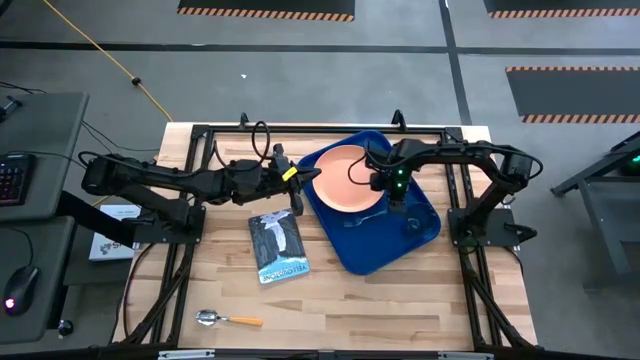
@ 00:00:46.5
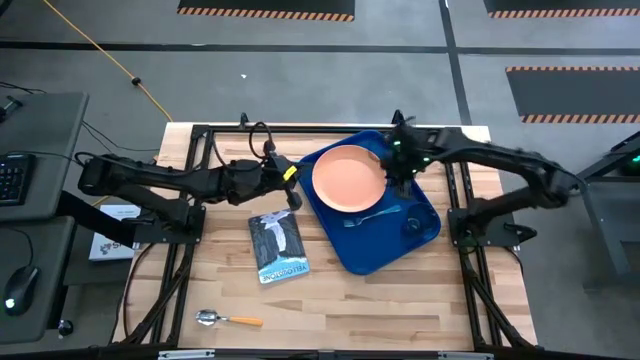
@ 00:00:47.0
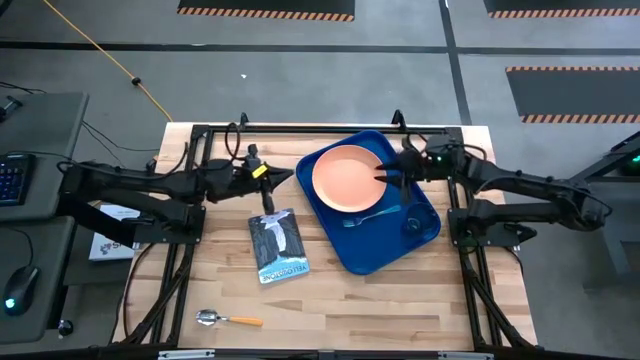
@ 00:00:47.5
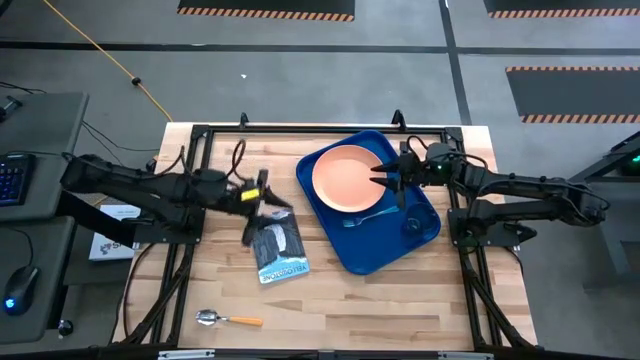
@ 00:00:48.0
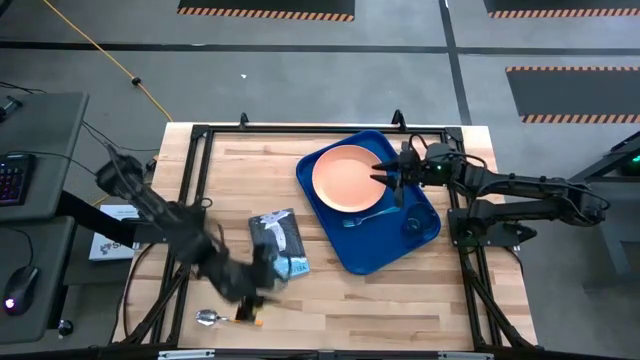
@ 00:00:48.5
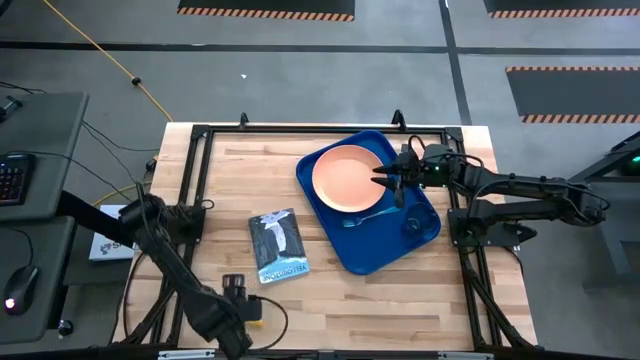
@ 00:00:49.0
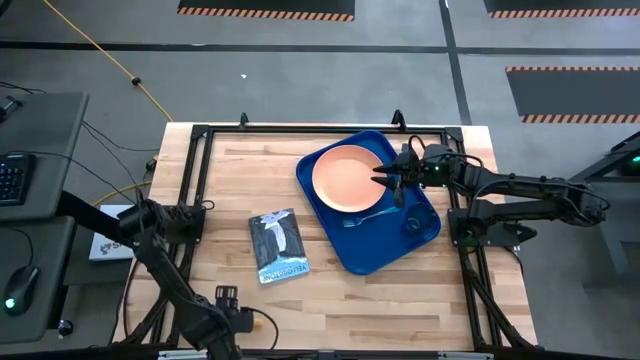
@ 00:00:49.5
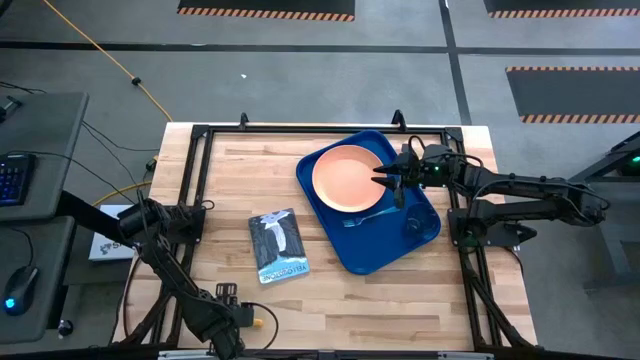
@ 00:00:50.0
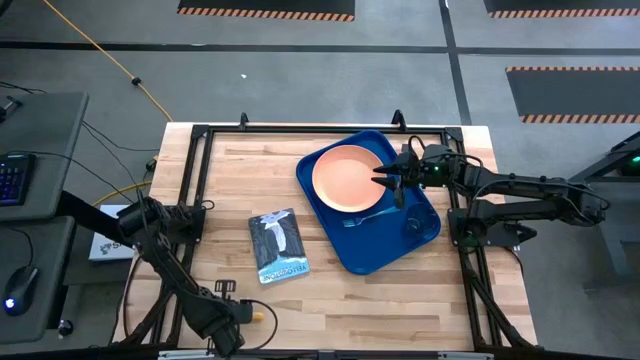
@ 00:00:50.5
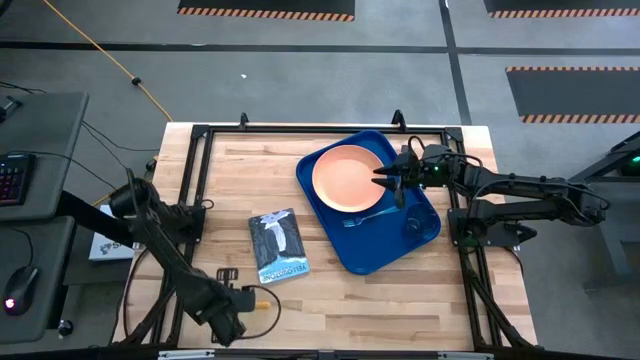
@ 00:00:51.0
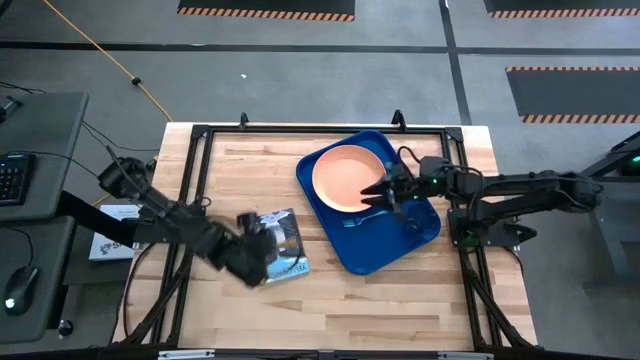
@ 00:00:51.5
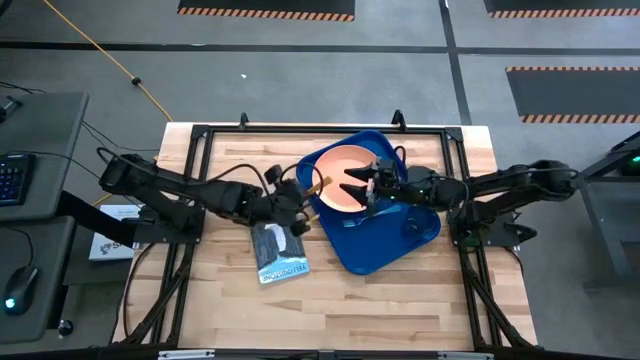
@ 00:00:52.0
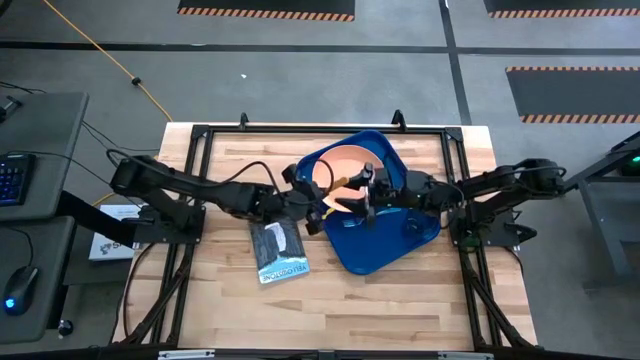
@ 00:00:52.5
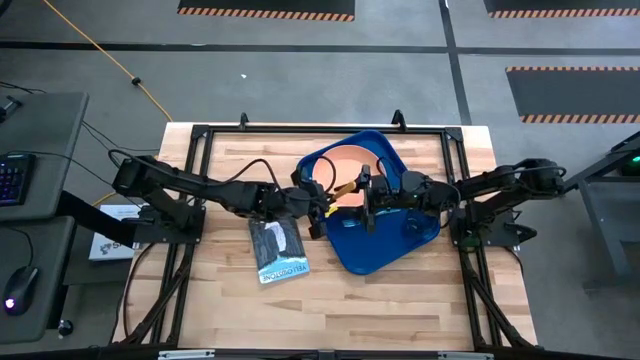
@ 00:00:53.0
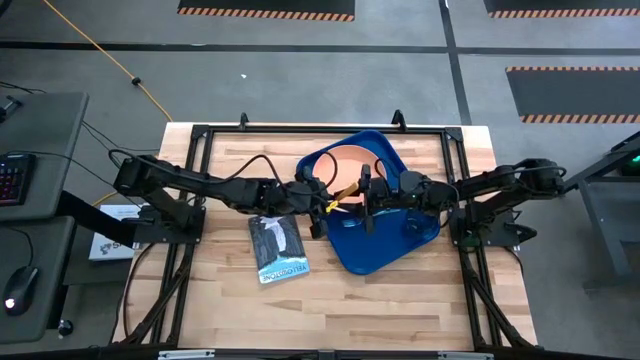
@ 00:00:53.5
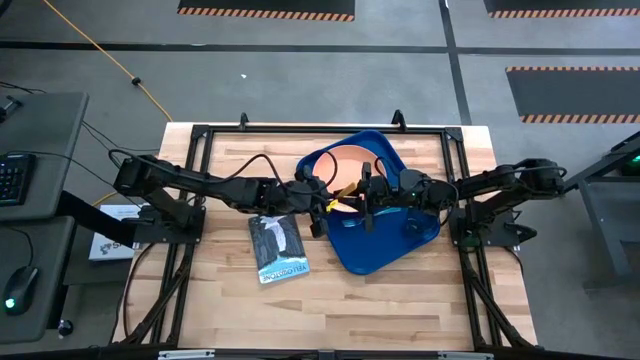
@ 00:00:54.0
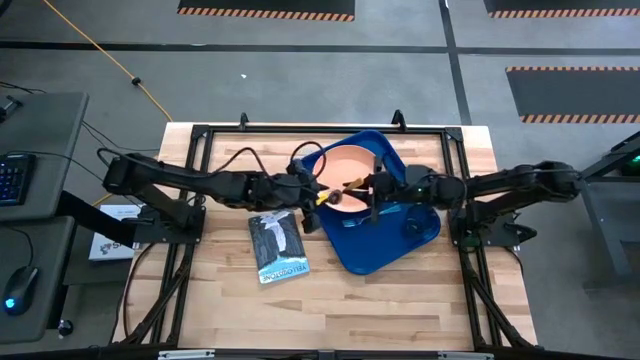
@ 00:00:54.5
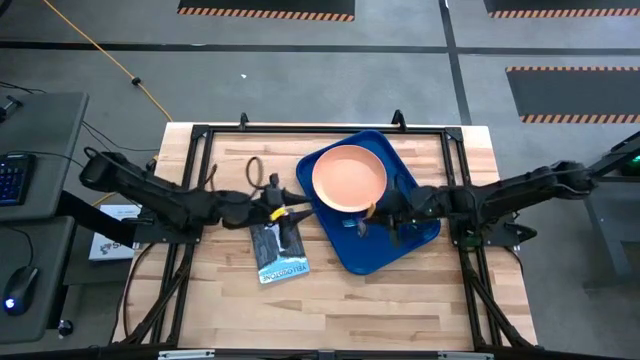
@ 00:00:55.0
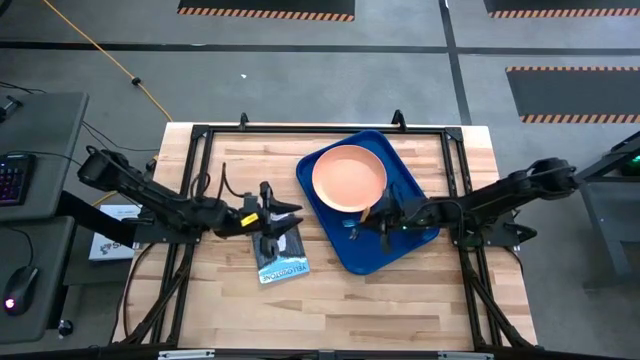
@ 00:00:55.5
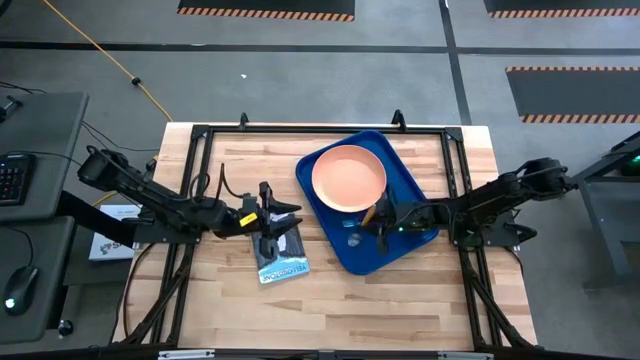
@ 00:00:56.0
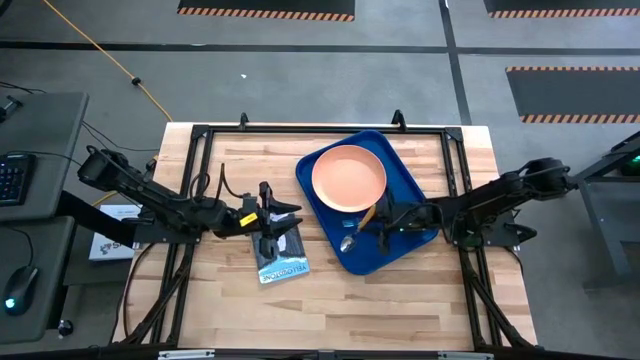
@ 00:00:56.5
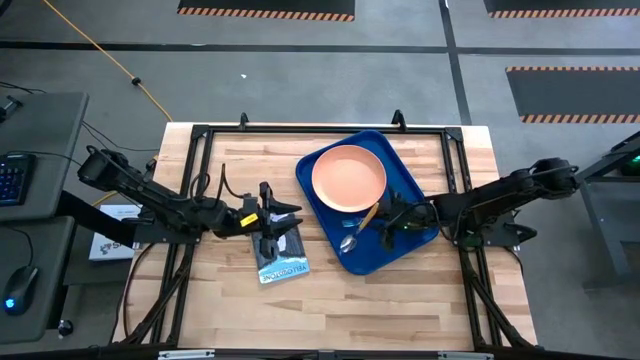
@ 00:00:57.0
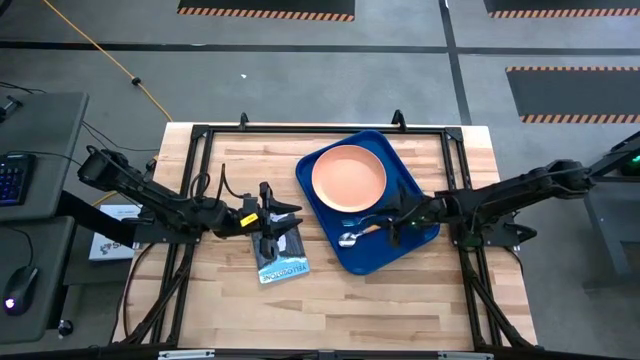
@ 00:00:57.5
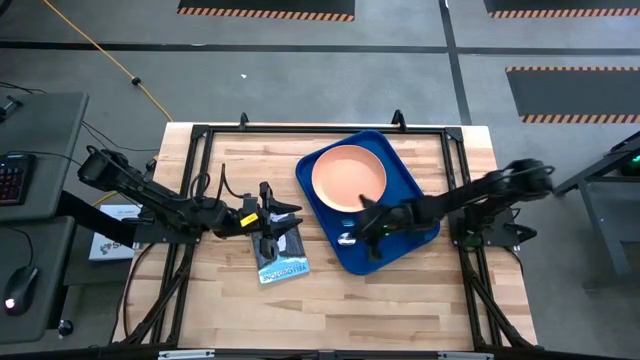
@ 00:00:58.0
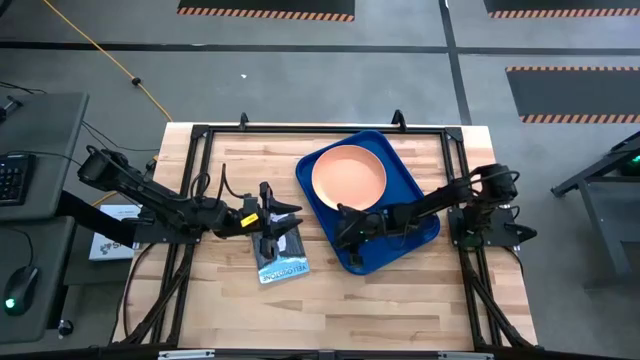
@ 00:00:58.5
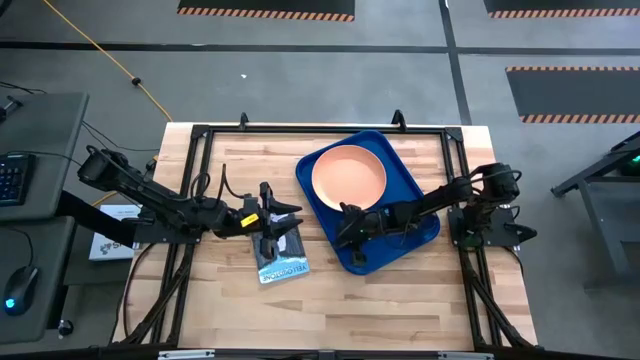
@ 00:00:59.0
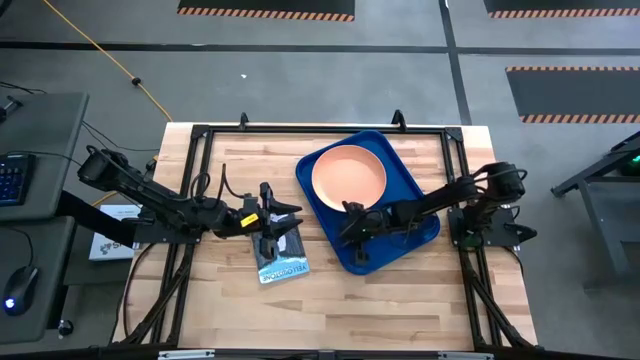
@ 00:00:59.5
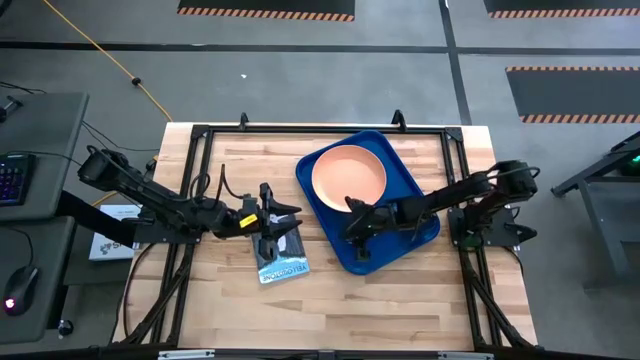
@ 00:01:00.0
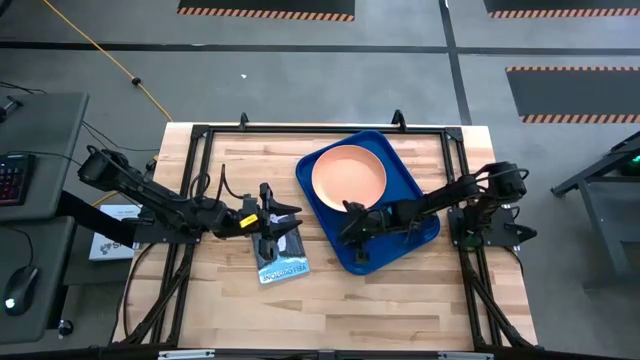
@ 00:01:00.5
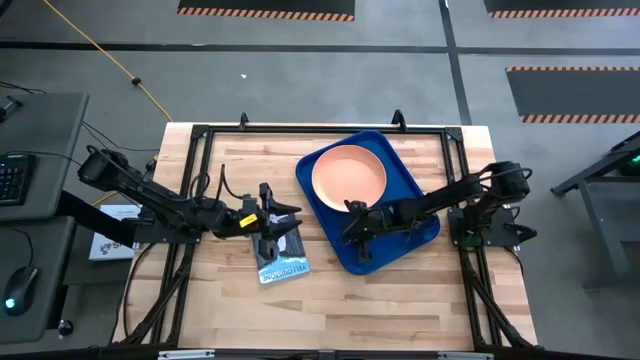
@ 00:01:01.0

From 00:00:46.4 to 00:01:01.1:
Task: Pick and place plate/cup/fork/spoon on tray
Put the yellow spoon on the right side of the iridescent fork on the blue tray

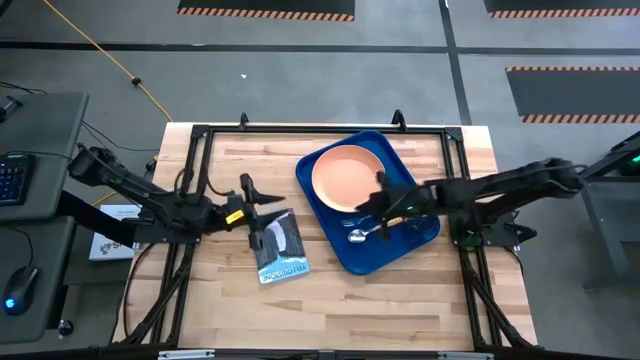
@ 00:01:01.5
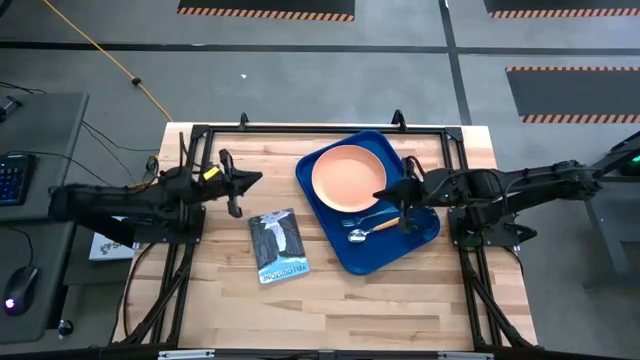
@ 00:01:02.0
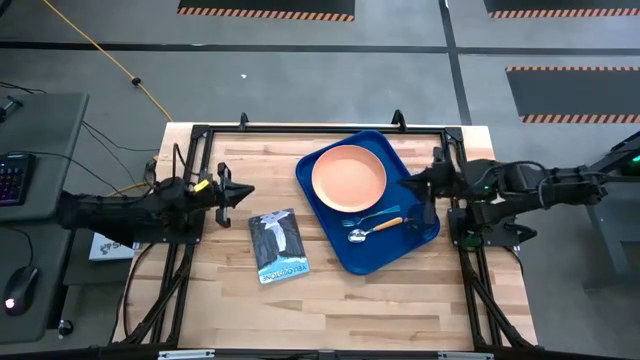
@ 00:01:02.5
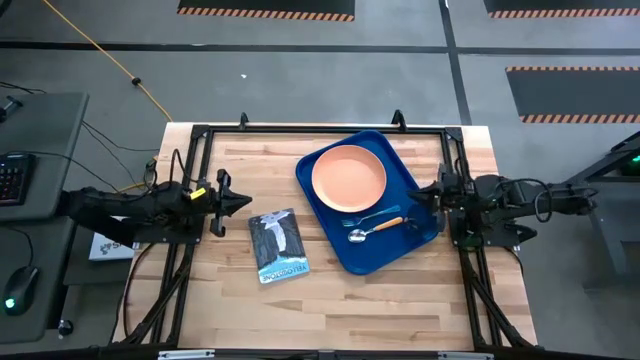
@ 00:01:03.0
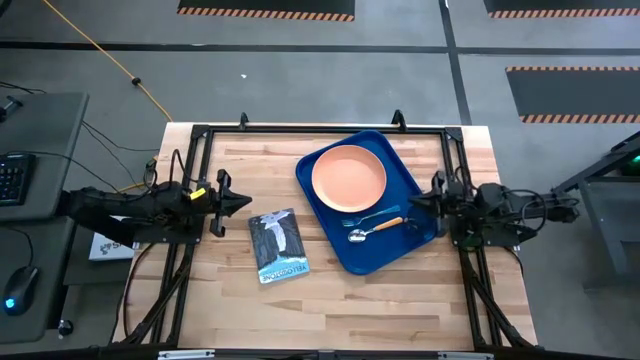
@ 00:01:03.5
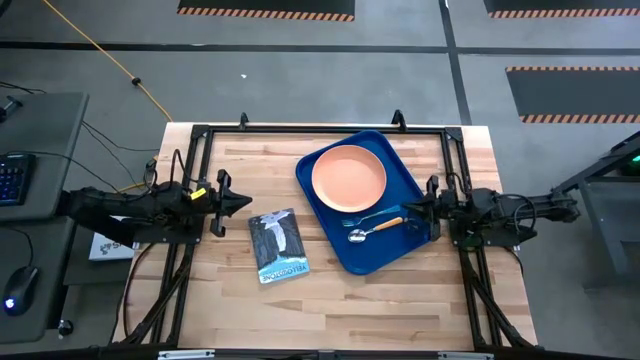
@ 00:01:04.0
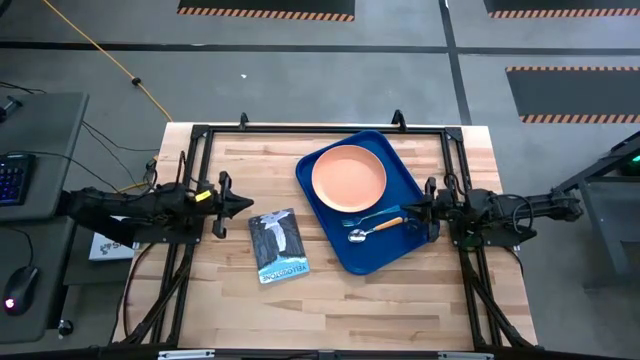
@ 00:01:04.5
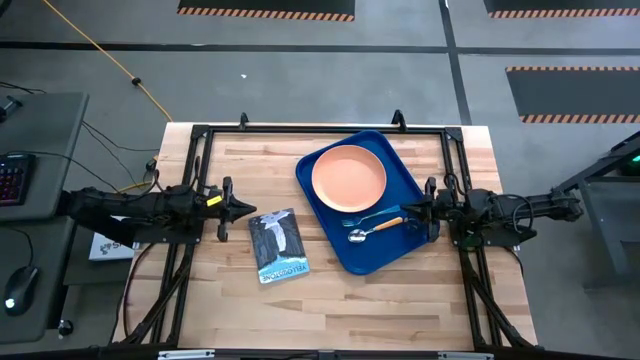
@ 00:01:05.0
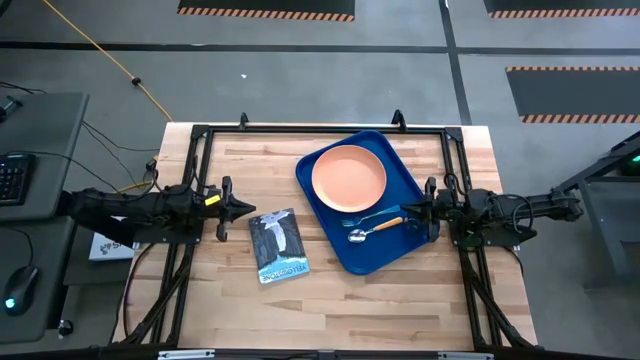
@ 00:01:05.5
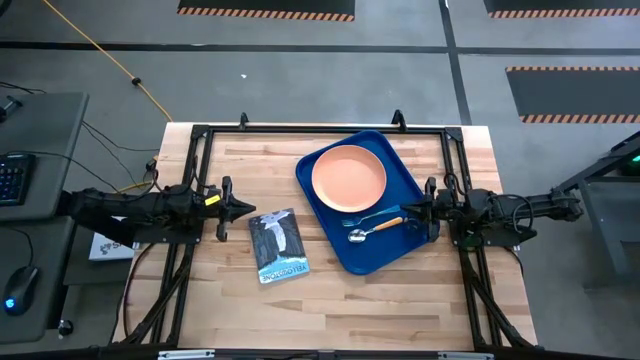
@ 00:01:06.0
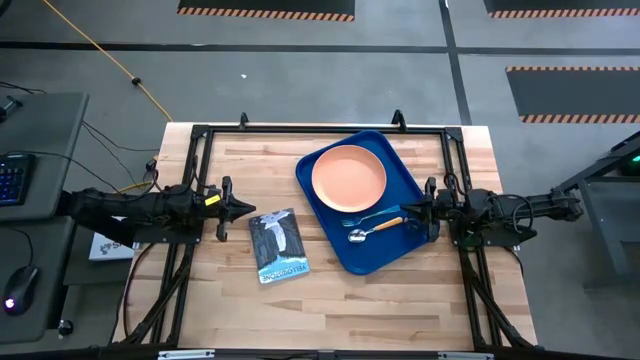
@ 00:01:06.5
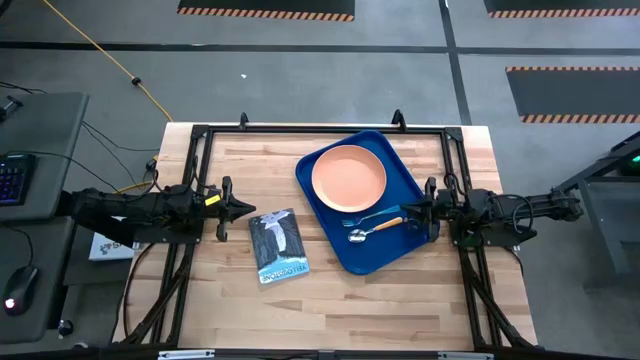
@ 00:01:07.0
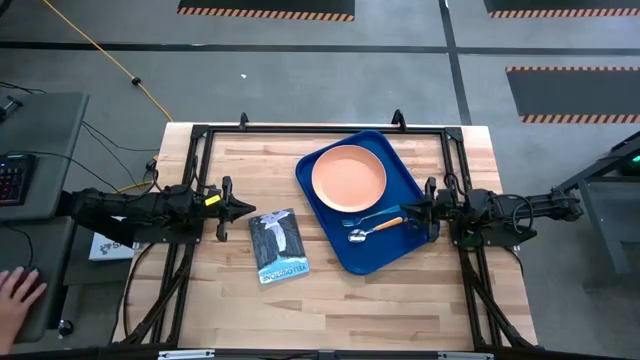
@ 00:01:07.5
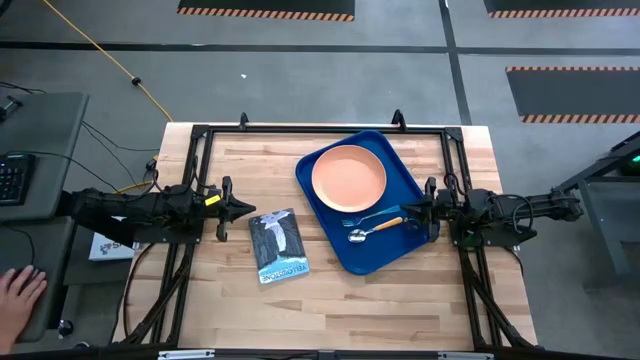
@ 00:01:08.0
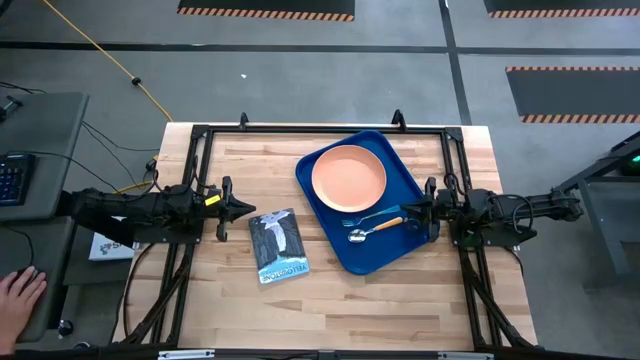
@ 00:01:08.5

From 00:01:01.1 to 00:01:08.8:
Return to Home Position
